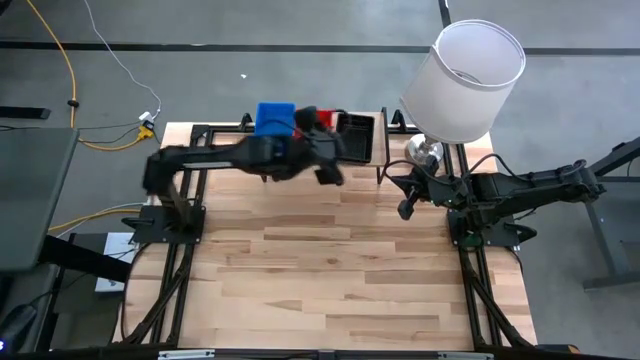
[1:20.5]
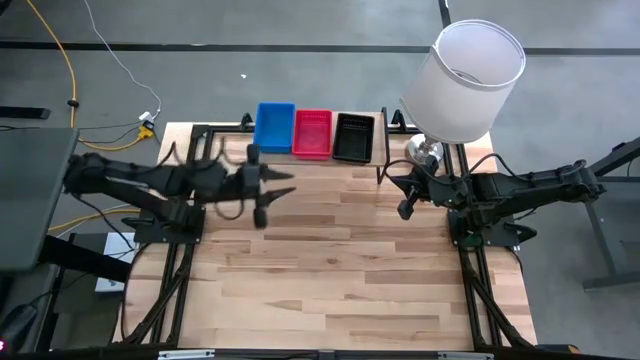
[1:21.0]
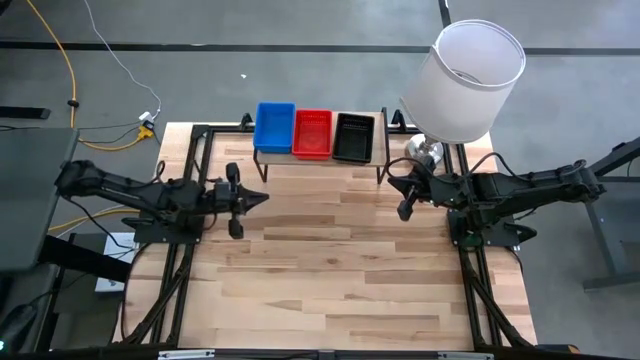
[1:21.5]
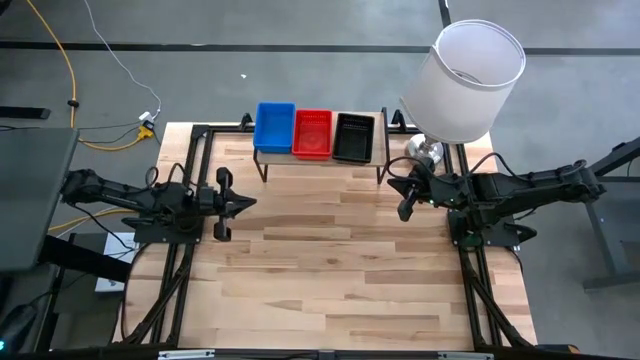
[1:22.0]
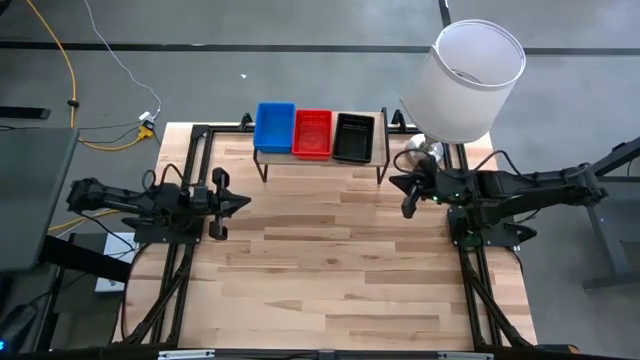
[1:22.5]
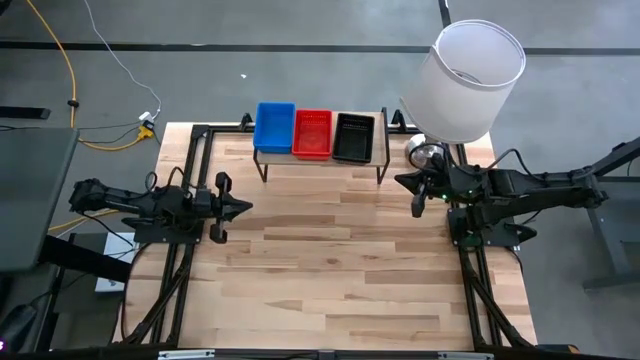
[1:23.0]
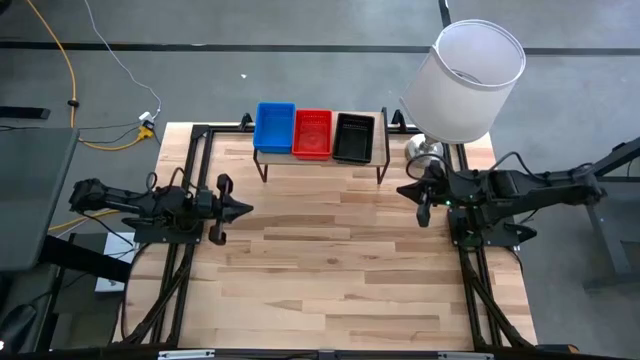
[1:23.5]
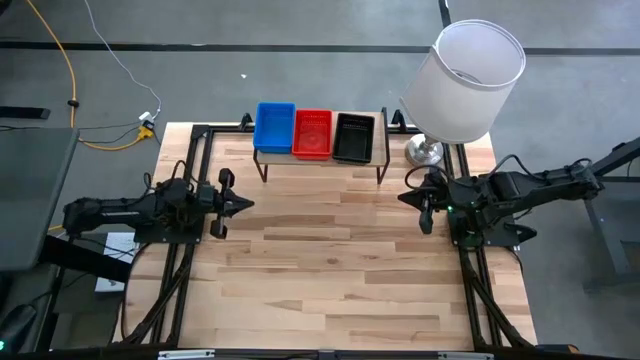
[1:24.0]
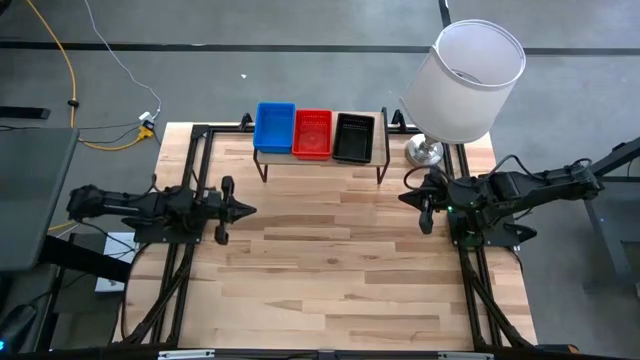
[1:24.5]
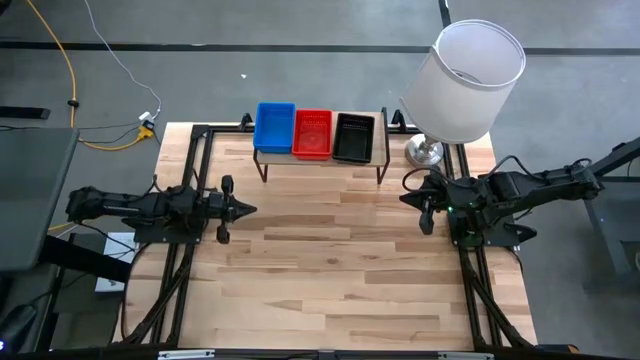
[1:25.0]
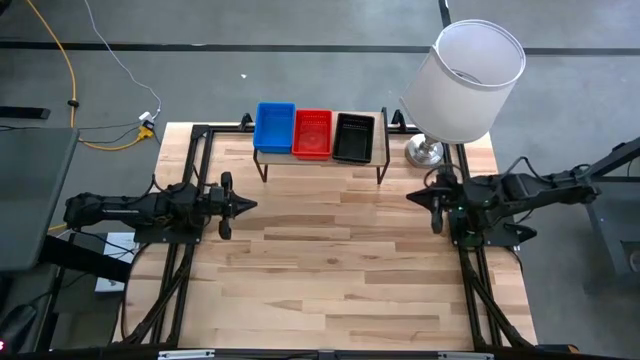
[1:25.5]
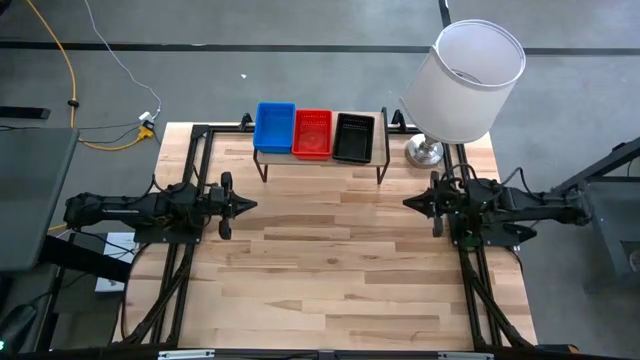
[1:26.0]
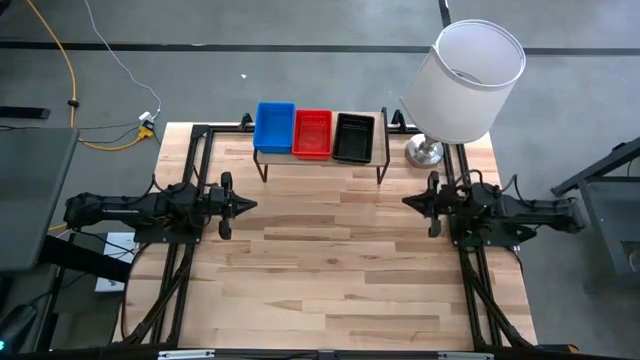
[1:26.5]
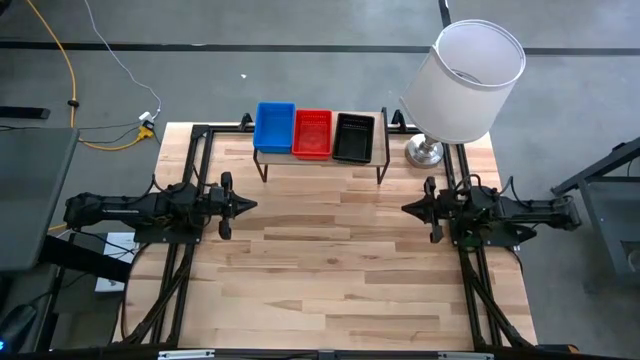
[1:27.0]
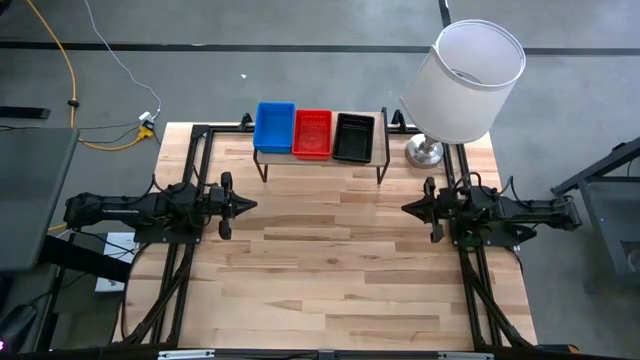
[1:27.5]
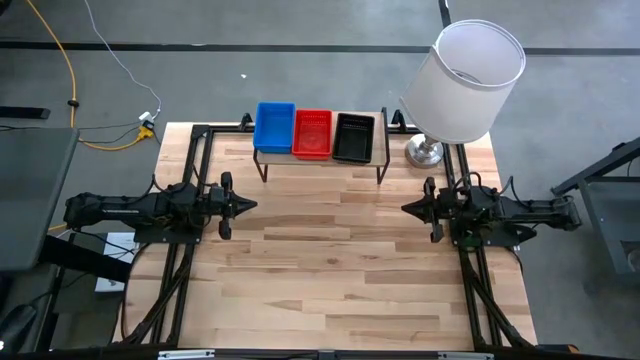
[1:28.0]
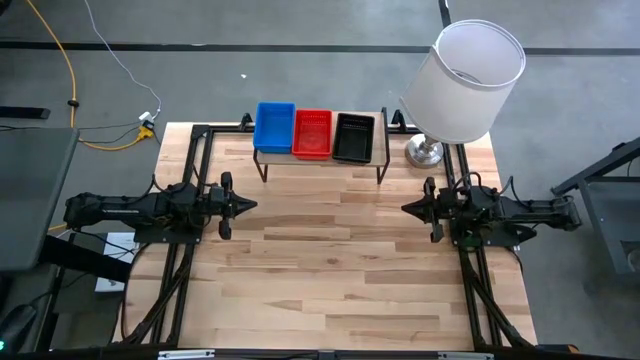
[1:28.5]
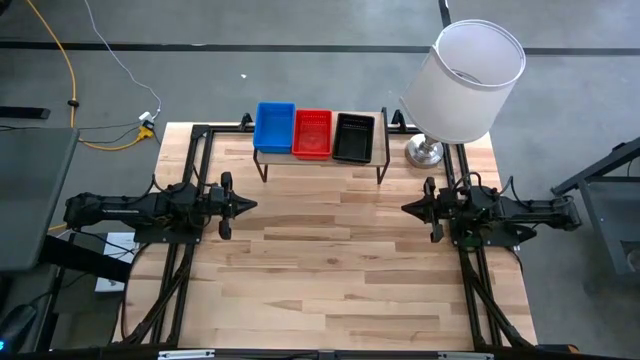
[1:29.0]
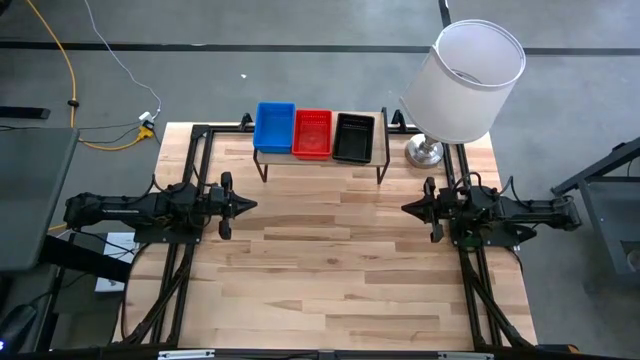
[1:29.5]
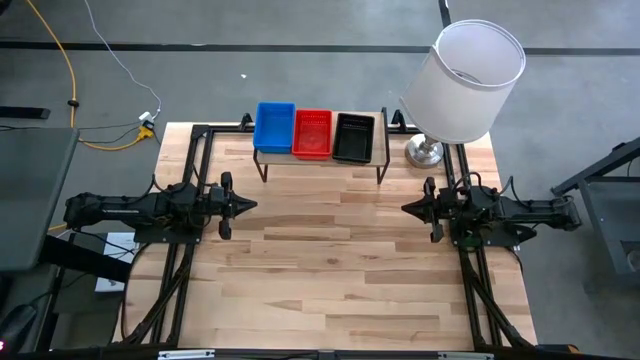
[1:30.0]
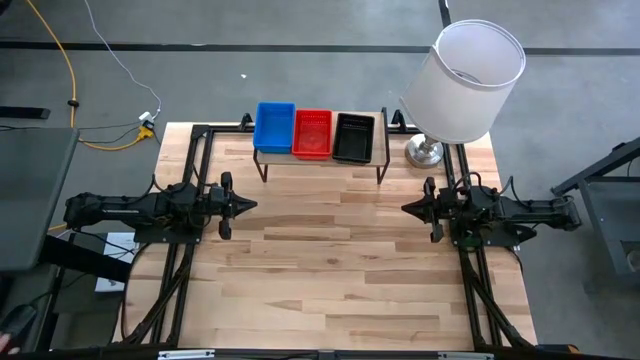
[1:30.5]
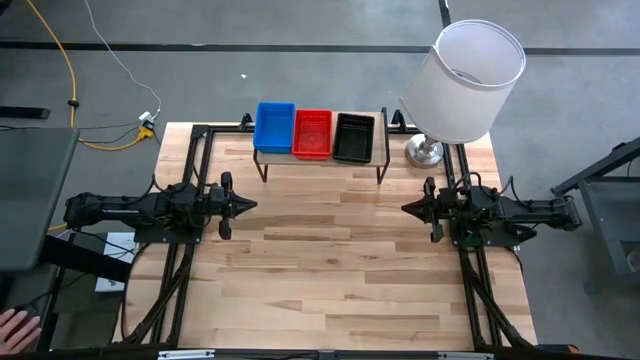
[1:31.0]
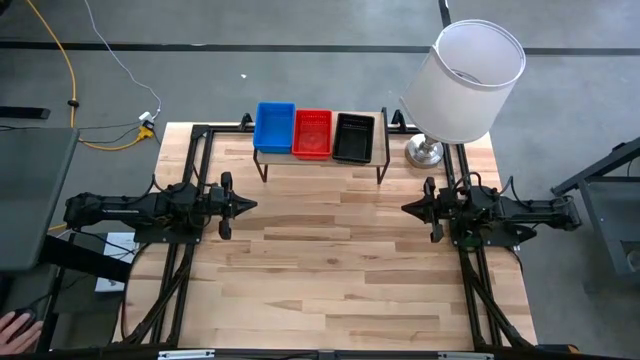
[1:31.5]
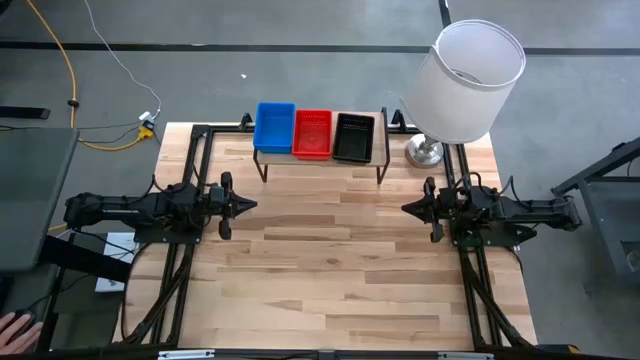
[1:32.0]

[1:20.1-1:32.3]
Task: Stack baskets on shelf by color
Return to Home Position

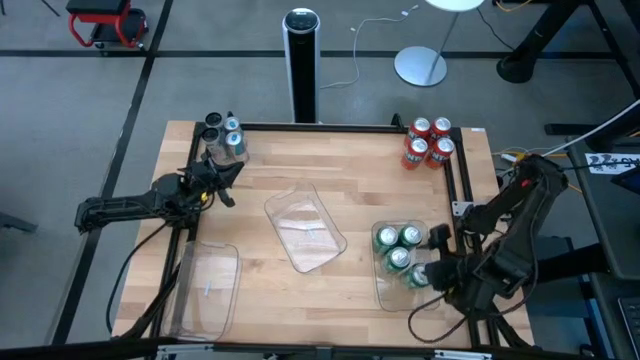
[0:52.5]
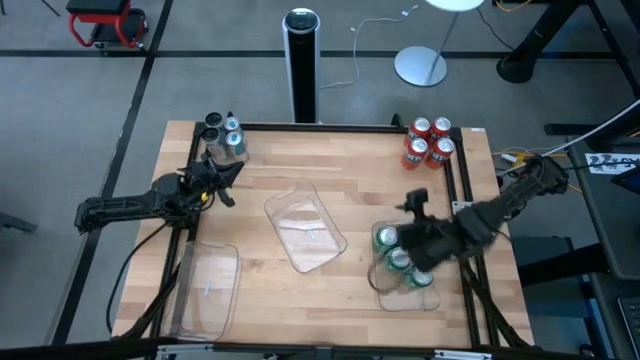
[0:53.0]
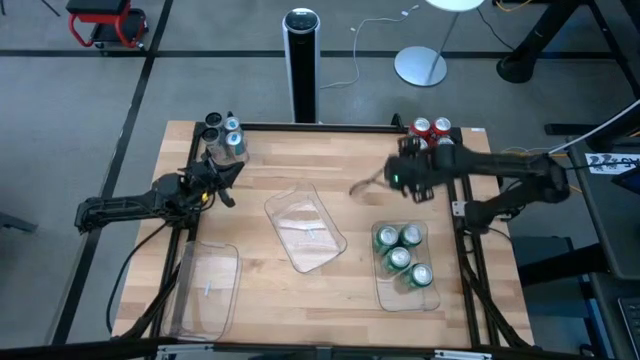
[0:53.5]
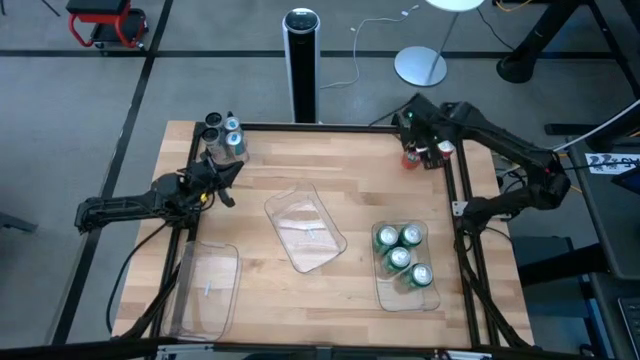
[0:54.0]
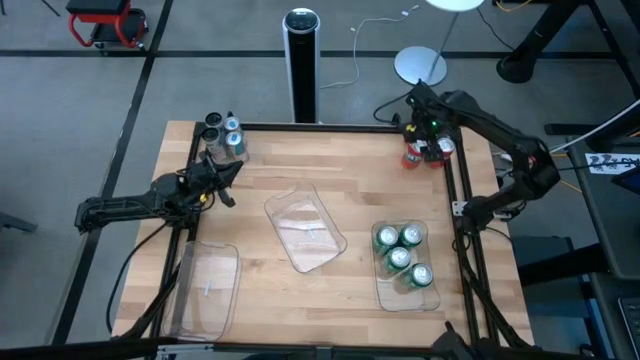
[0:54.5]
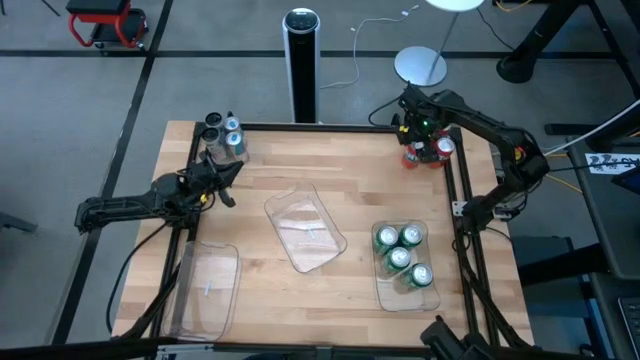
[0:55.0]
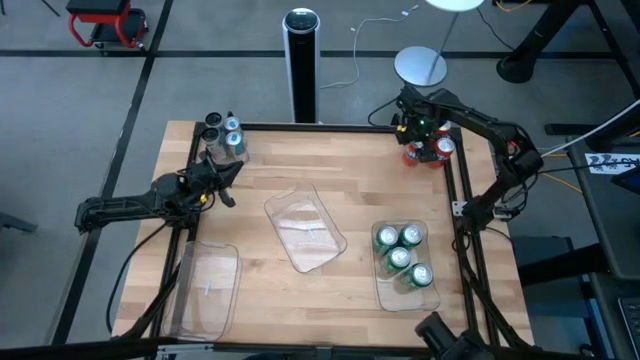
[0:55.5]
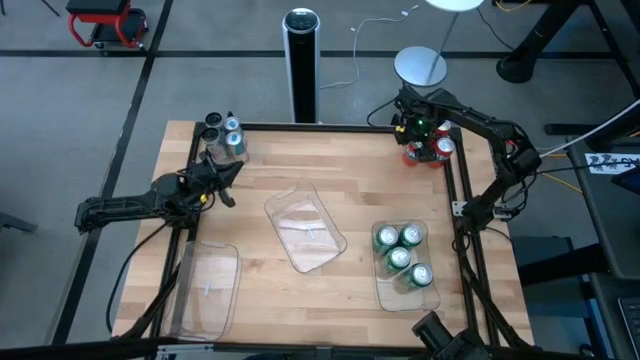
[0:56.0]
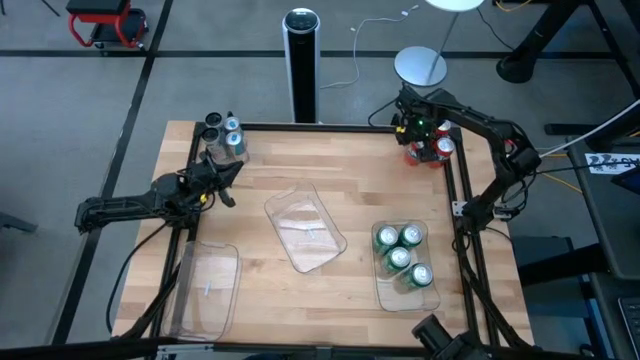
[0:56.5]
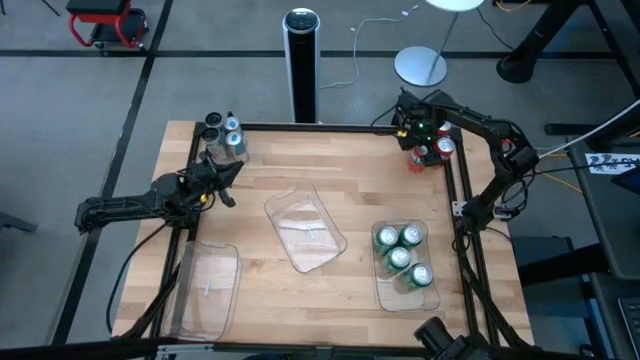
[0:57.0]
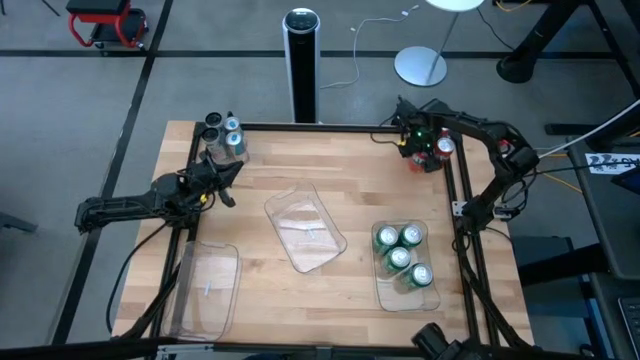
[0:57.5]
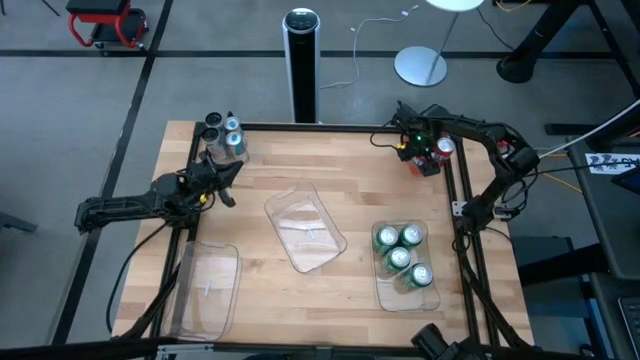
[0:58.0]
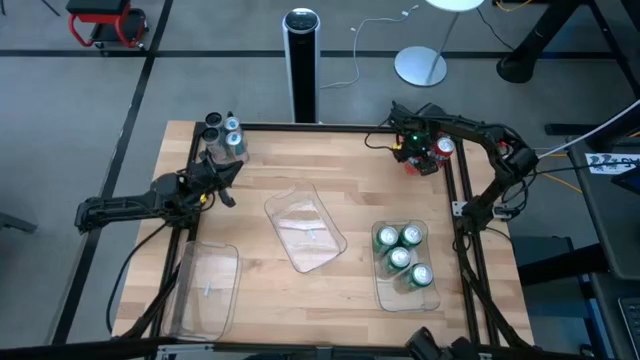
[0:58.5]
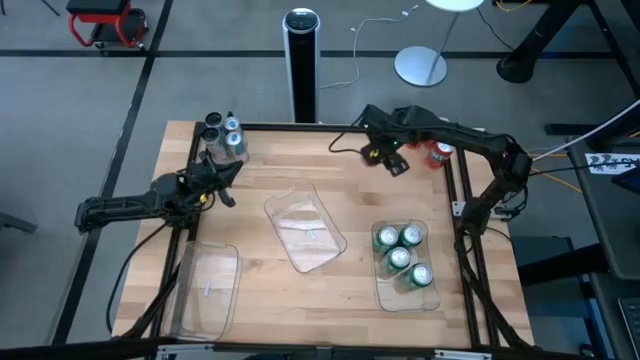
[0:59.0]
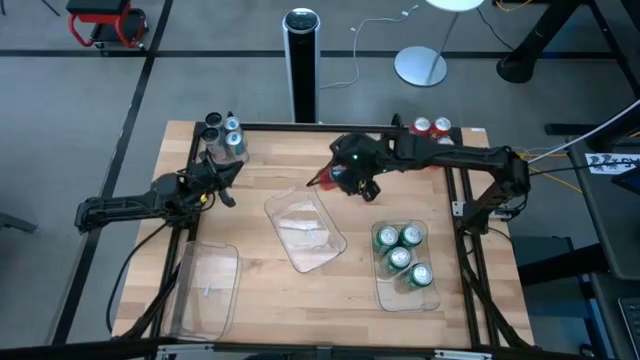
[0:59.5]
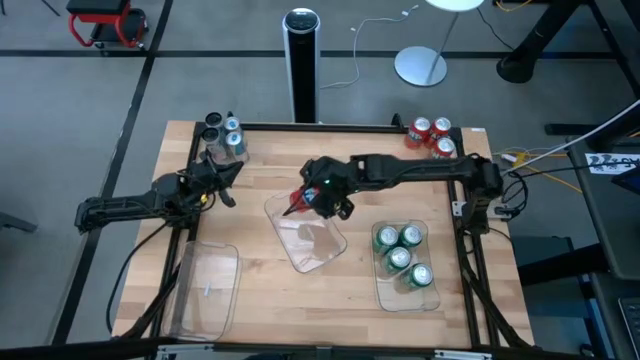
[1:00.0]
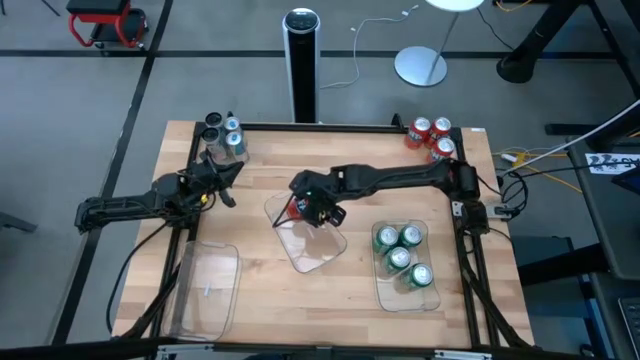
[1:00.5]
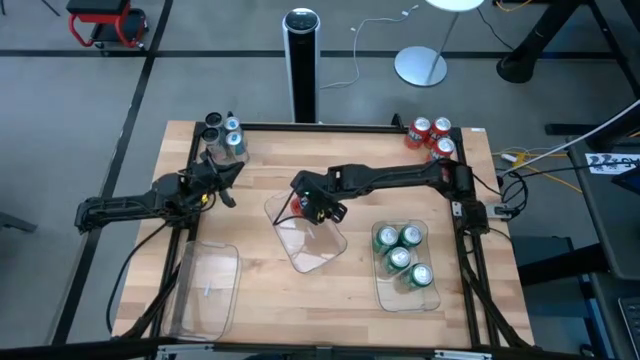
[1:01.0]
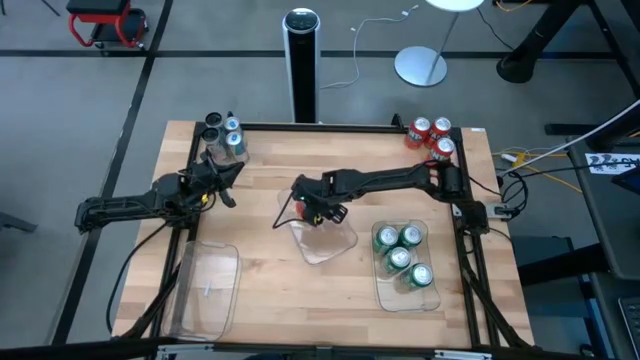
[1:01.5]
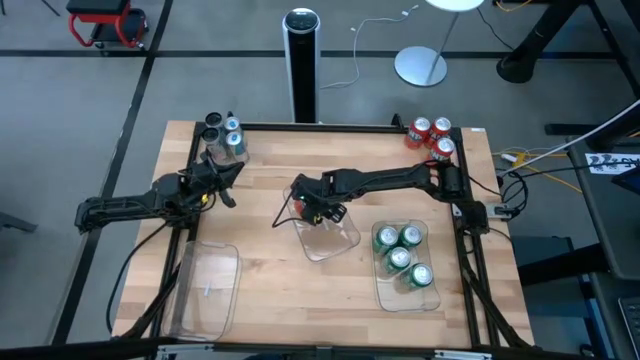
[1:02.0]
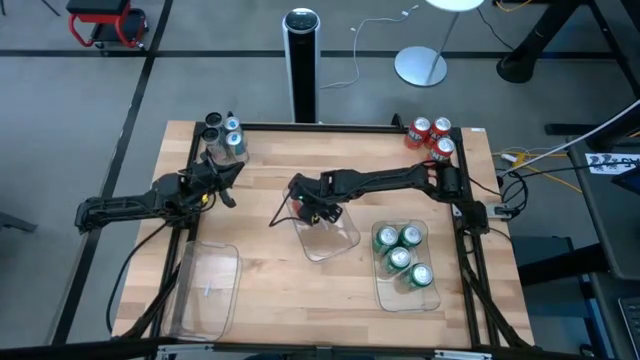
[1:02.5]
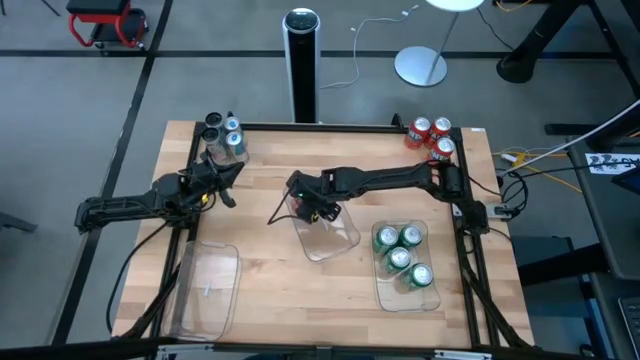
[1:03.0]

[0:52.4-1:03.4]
Task: Sort soda cans
Put the bottom left orange soda can into the middle transparent bin
